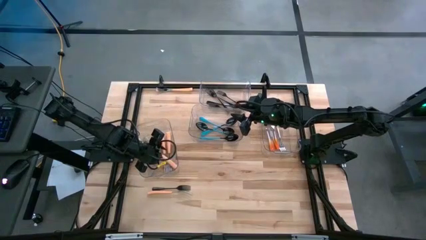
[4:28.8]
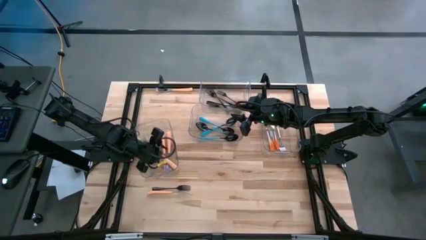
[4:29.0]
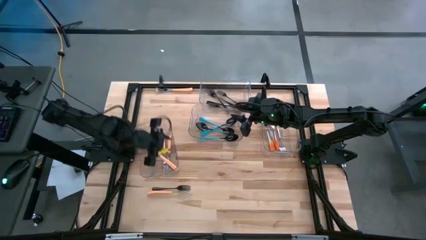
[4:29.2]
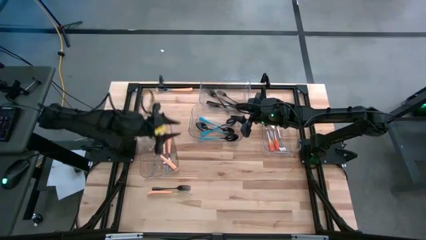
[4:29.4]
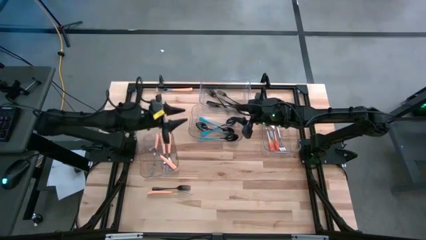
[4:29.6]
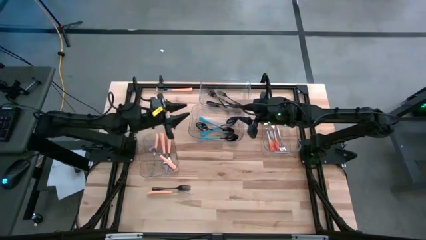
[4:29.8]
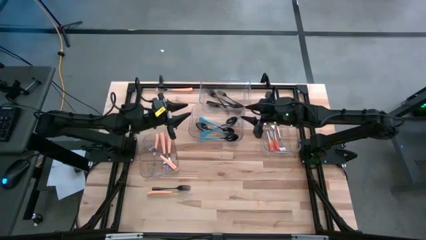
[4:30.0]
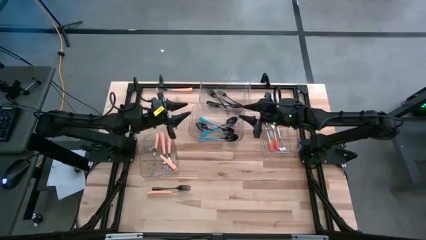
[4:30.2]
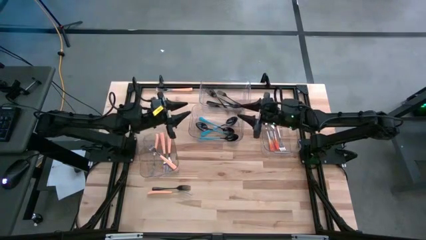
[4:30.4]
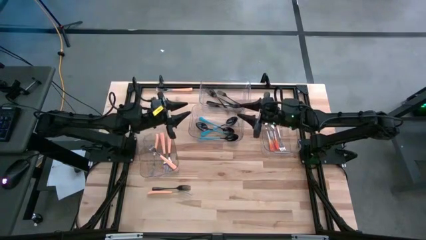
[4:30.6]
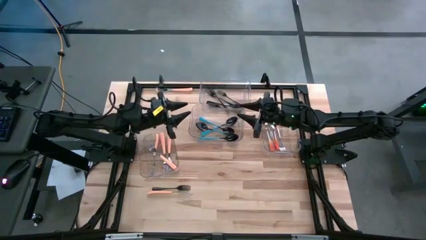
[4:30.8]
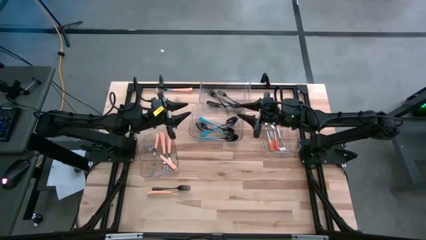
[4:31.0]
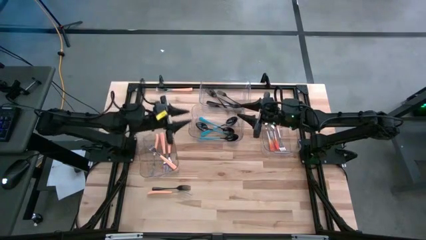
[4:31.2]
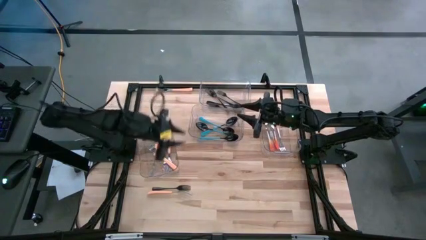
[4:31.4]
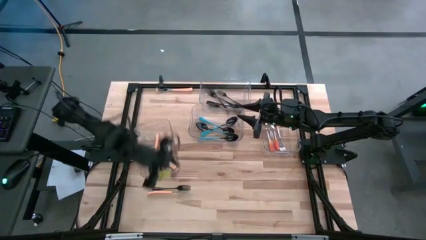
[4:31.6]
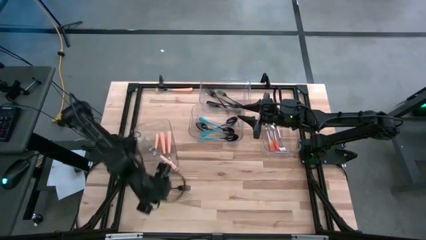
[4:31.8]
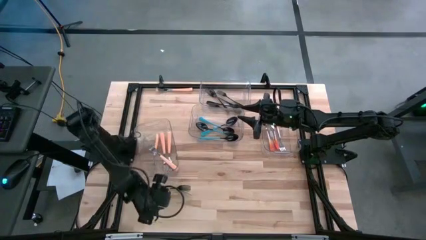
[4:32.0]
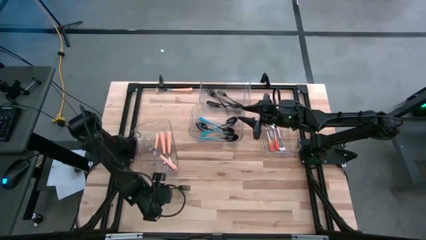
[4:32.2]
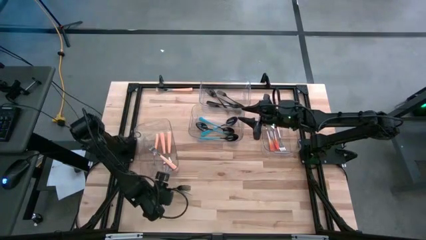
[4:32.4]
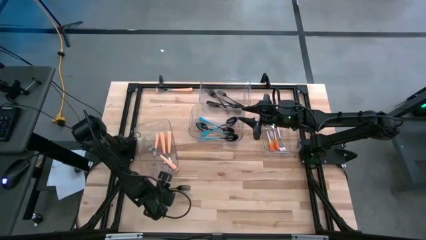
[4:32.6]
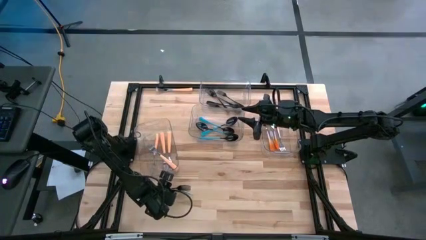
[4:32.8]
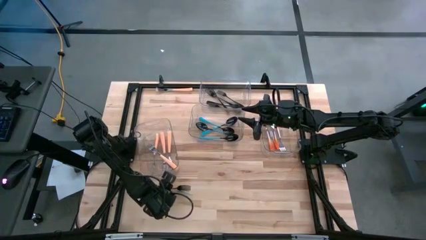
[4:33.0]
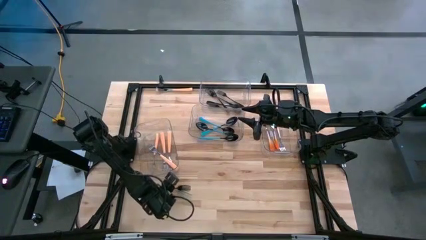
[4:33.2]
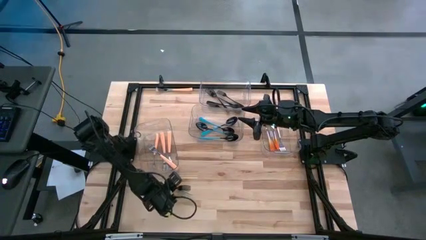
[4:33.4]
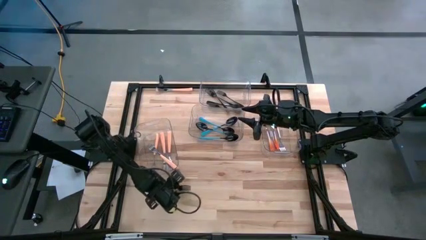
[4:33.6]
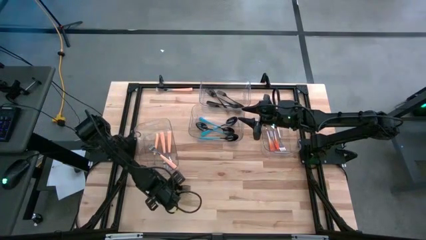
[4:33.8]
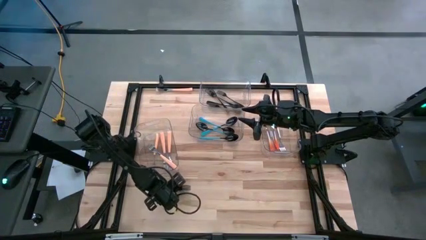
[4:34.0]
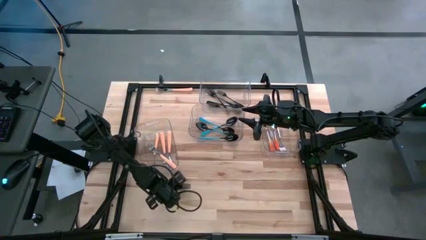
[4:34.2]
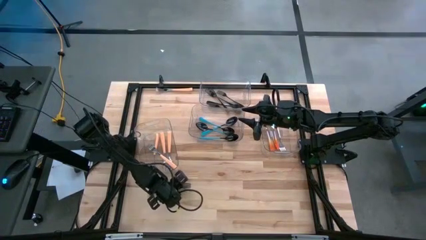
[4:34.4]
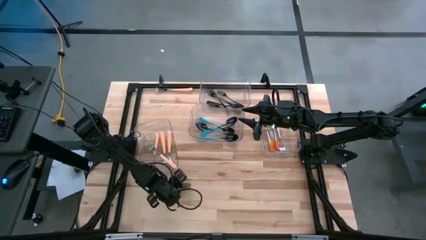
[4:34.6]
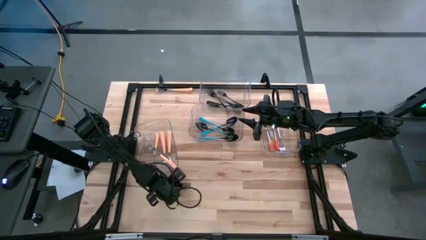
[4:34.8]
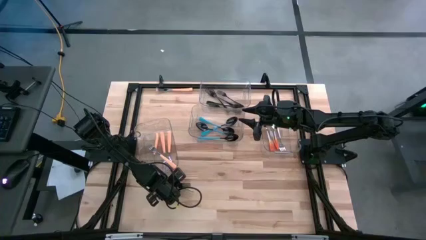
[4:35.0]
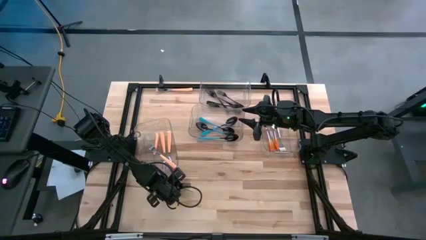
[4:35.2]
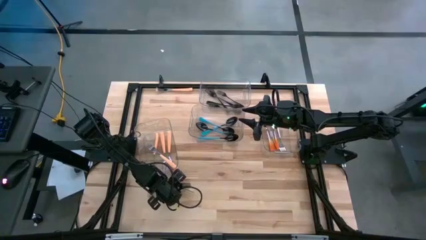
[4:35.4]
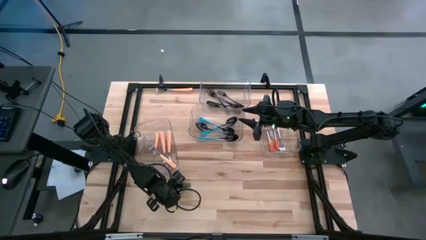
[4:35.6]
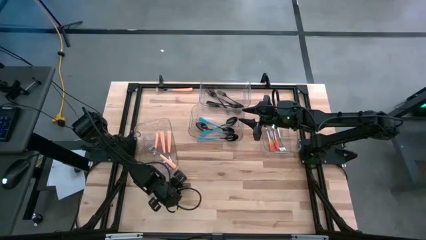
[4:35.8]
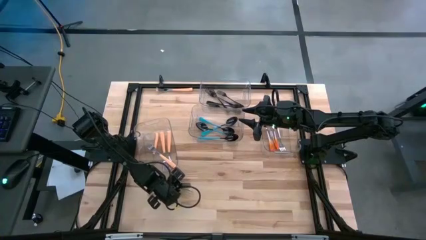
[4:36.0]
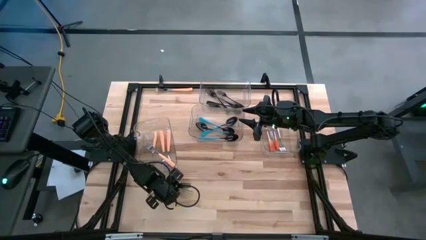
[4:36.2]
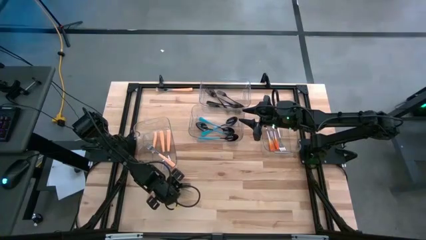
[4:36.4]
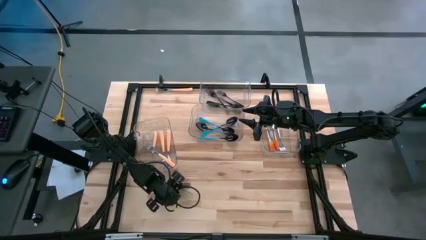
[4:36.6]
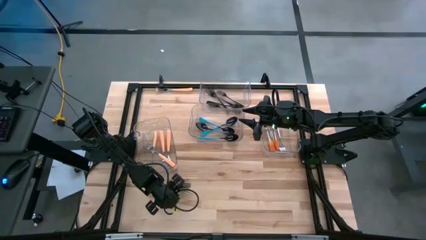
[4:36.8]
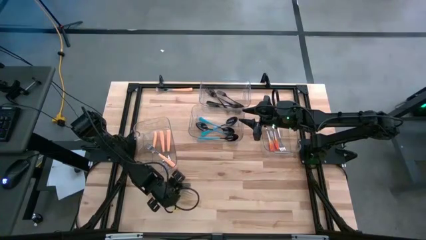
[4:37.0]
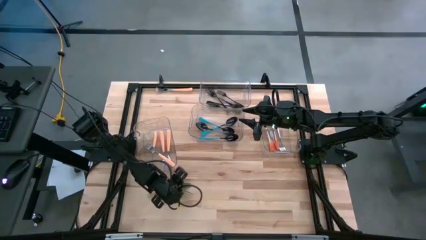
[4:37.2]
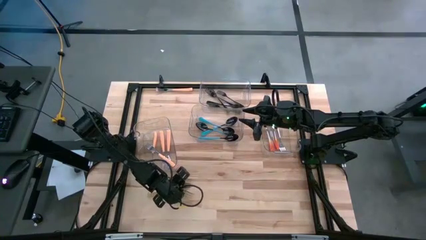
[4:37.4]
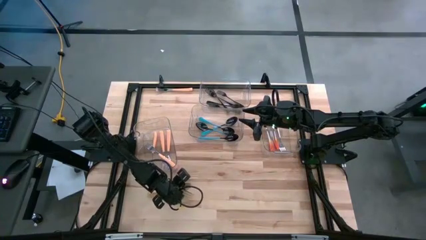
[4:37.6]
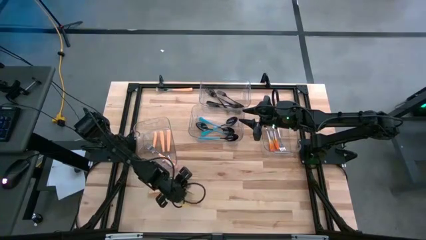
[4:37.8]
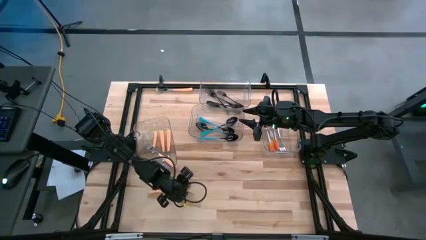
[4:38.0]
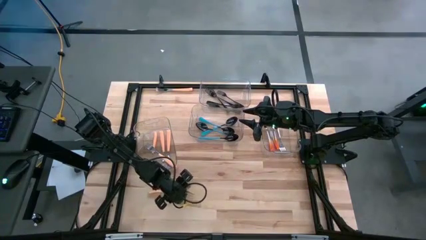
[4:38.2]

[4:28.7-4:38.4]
Task: Sort silverware by color (type)
Put the light orange fork into the bottom left transparent bin

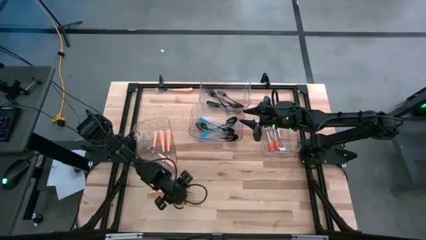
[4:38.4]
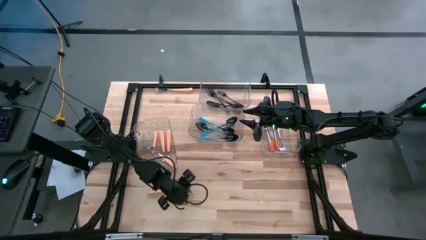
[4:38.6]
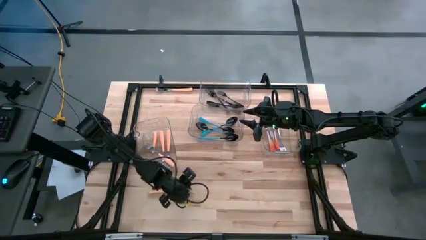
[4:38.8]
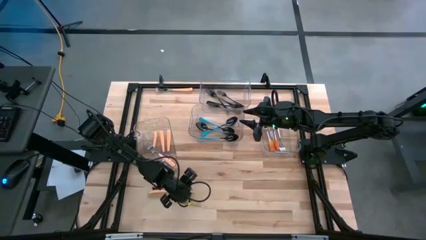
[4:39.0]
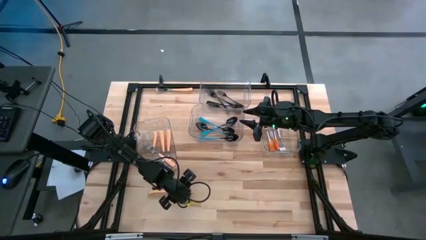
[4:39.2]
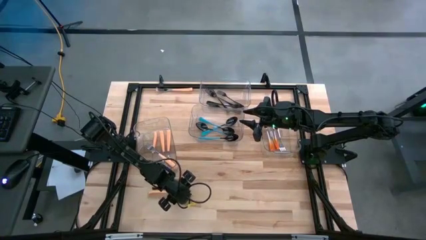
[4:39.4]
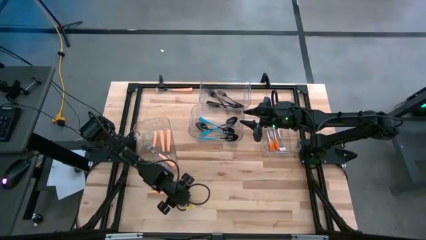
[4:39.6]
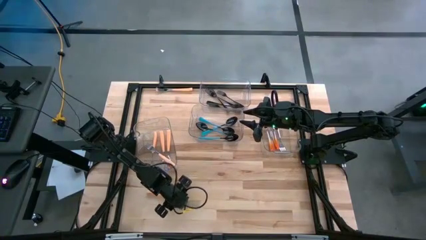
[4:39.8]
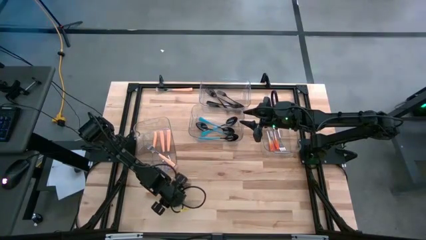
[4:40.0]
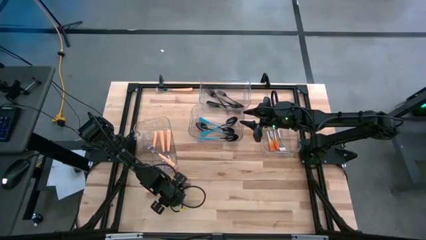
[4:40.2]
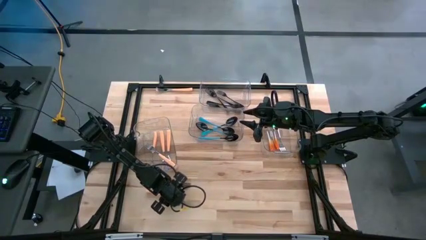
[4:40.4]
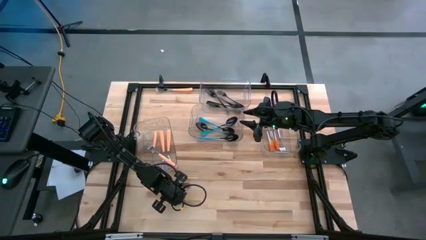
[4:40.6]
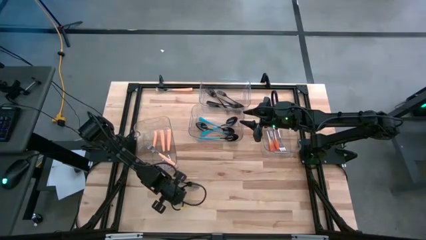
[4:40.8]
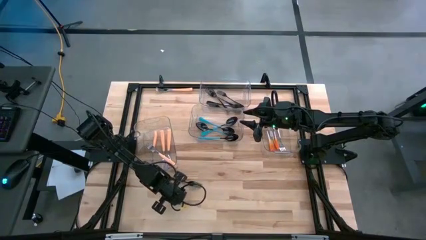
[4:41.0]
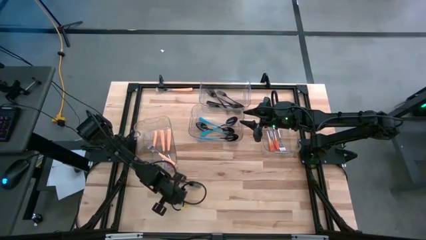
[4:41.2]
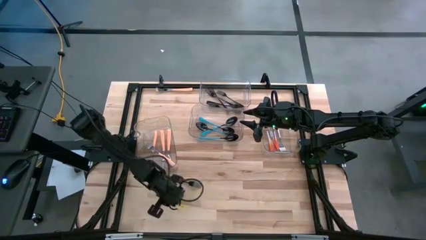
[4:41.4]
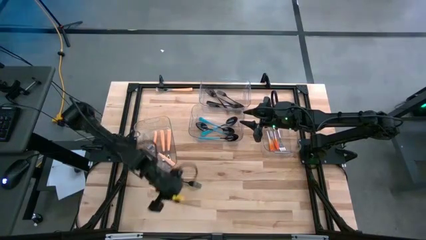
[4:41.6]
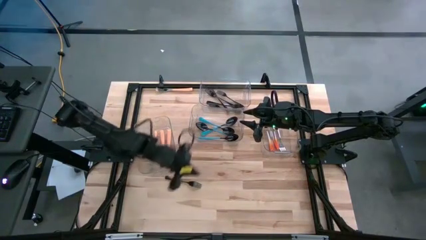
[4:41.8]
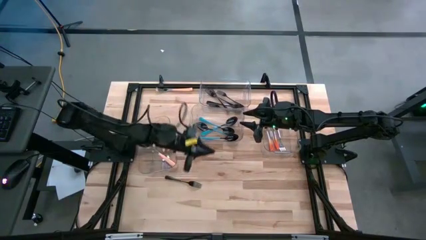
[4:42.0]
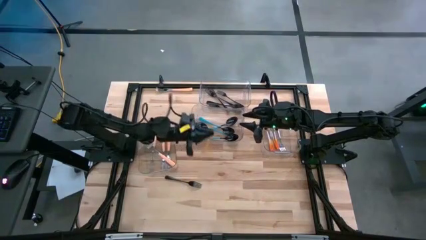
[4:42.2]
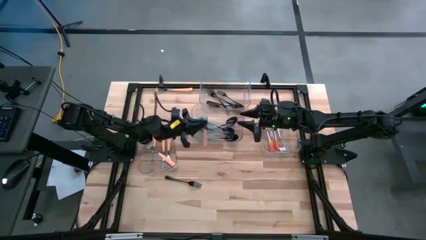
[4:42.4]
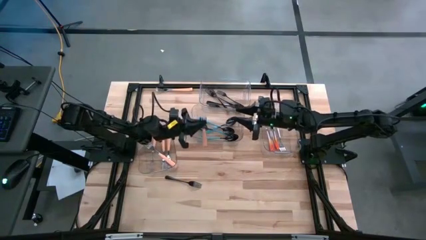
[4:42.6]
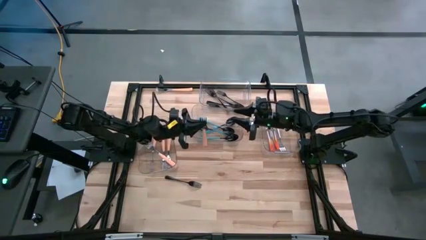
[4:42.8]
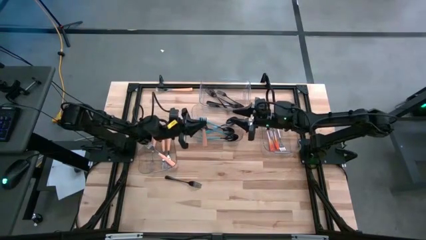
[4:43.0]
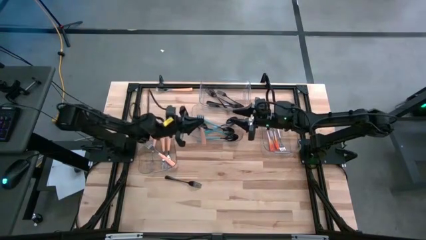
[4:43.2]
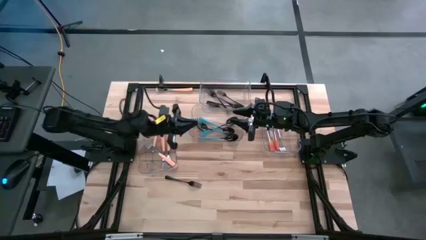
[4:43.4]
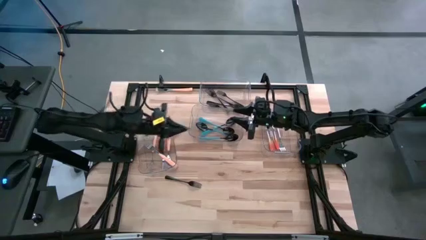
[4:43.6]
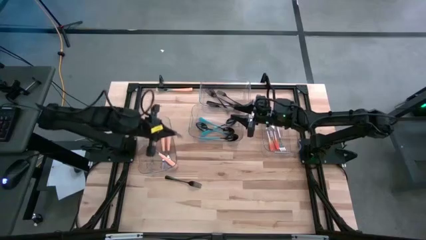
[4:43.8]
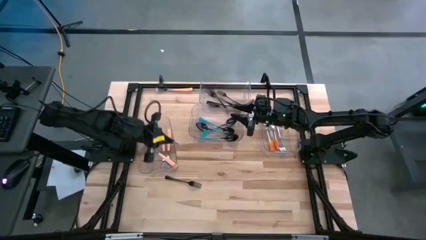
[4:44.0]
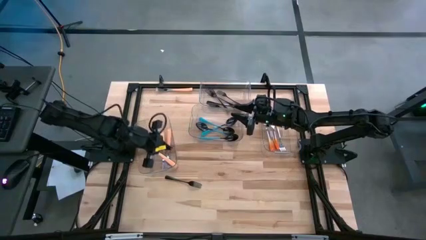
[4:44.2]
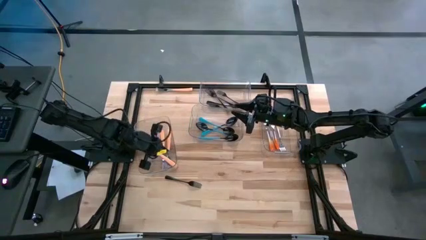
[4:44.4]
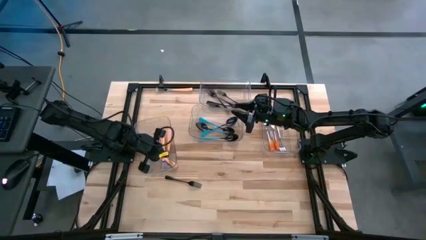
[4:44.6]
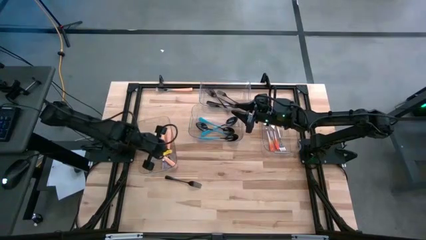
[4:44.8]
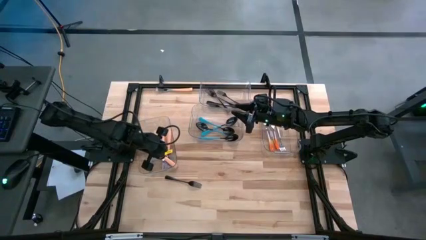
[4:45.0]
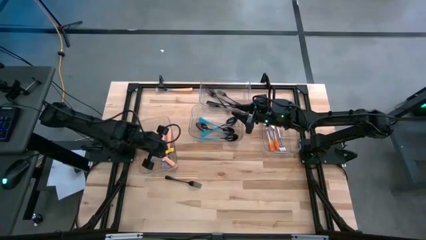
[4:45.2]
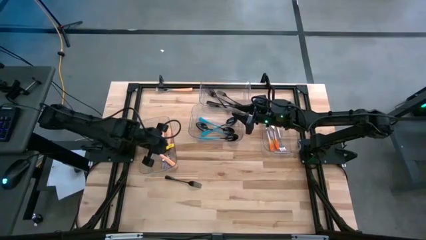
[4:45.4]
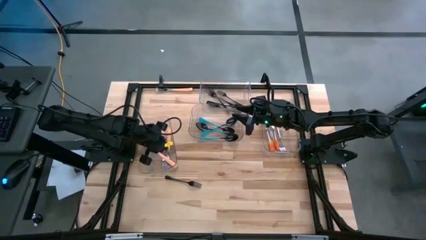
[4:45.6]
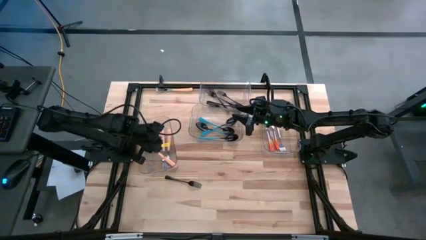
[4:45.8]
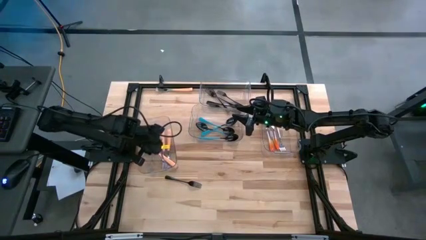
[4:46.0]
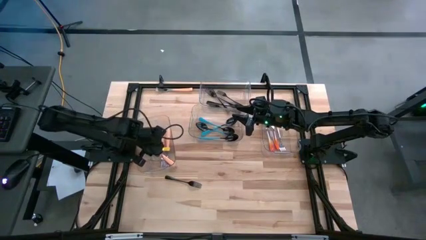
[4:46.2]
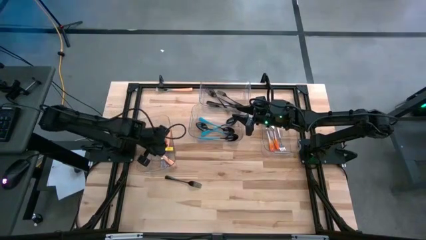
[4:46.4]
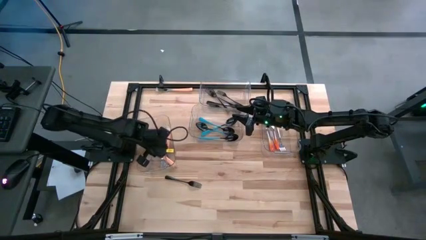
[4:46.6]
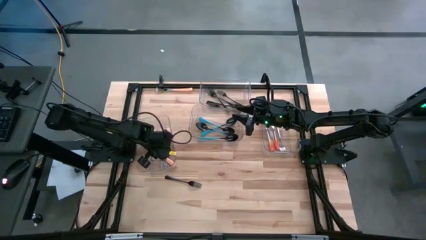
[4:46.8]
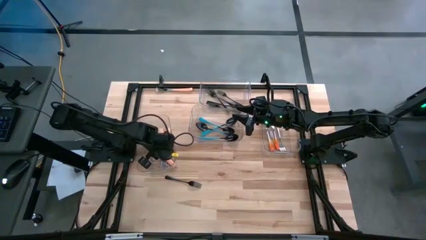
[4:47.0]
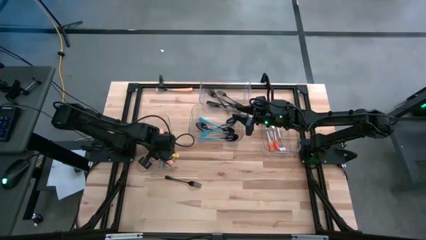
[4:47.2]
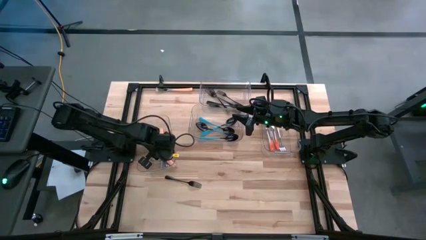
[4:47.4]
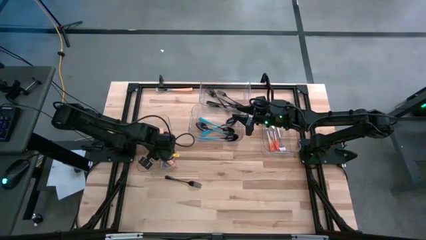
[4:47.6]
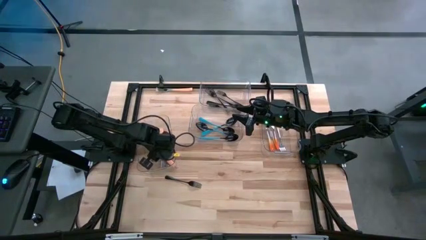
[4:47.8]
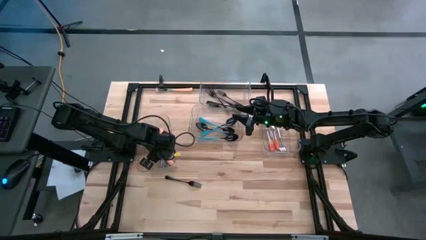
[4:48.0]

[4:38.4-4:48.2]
Put the light orange fork into the bottom left transparent bin
